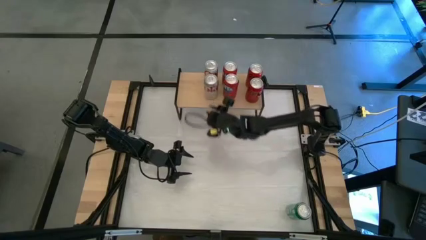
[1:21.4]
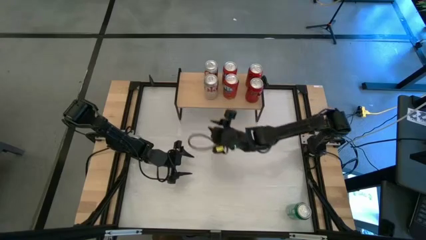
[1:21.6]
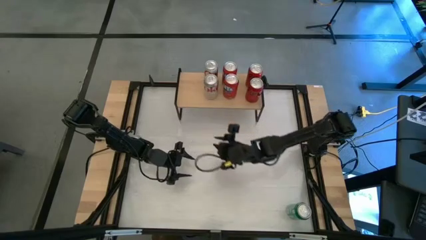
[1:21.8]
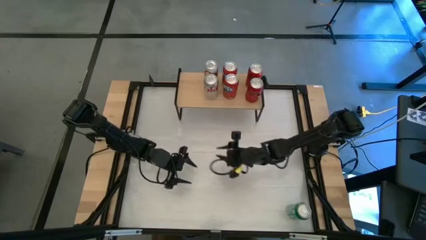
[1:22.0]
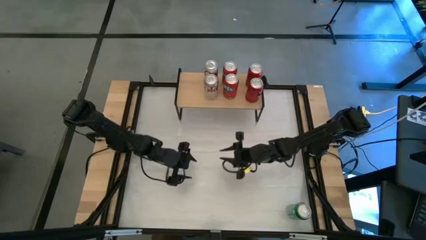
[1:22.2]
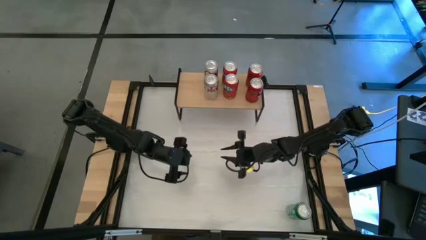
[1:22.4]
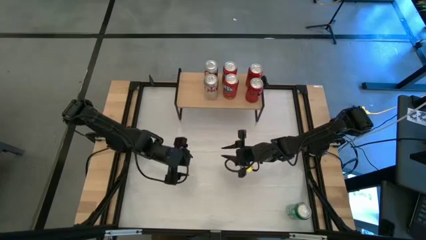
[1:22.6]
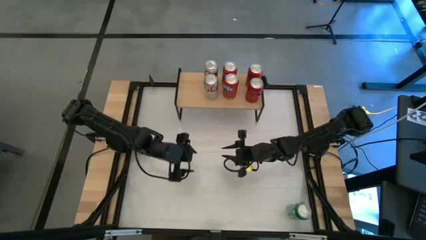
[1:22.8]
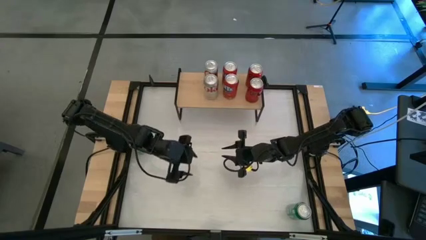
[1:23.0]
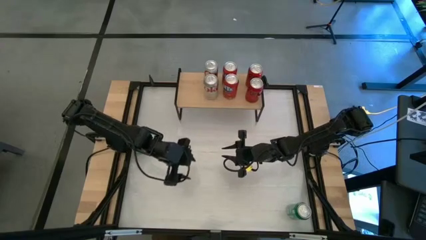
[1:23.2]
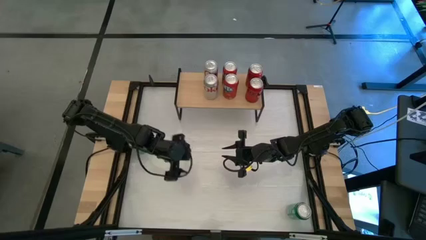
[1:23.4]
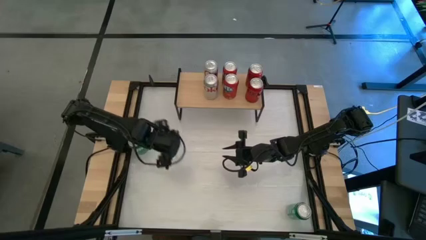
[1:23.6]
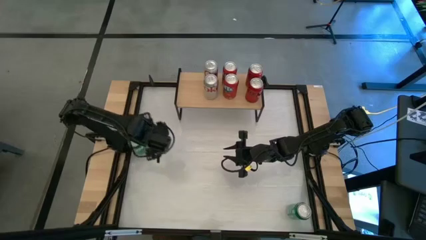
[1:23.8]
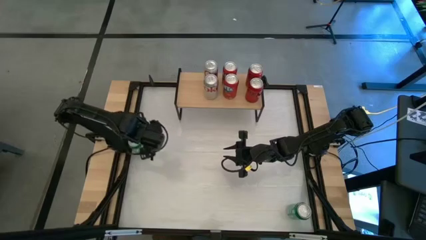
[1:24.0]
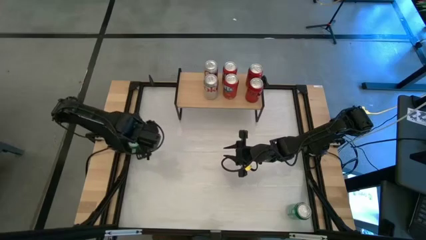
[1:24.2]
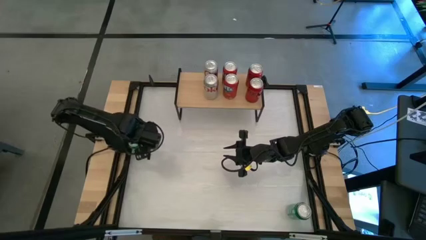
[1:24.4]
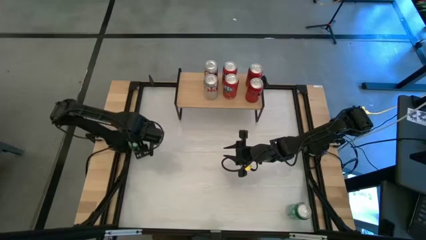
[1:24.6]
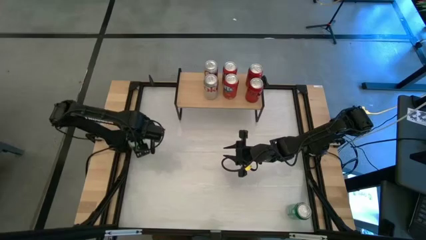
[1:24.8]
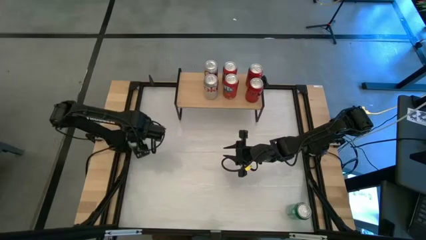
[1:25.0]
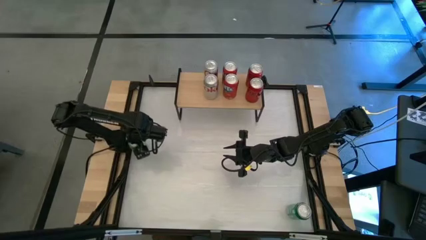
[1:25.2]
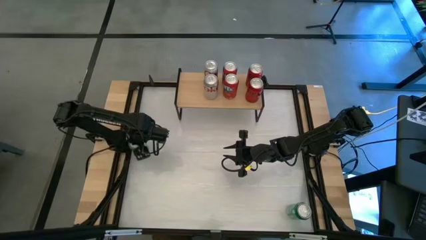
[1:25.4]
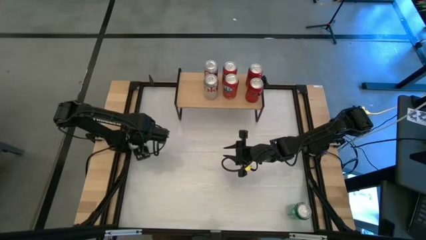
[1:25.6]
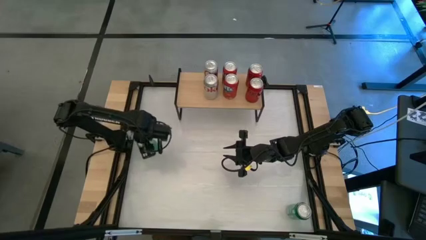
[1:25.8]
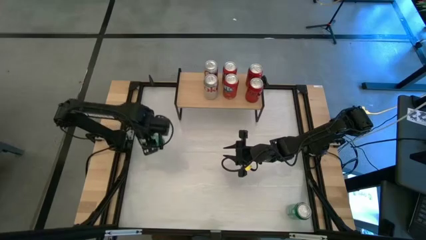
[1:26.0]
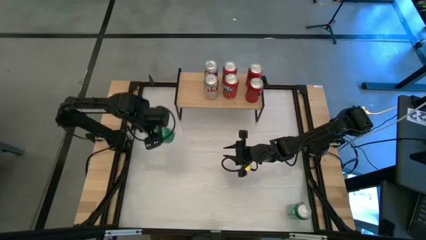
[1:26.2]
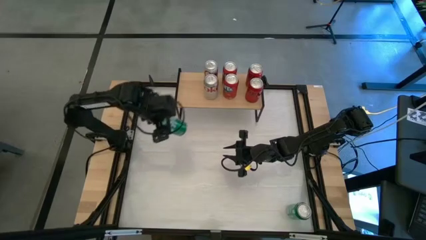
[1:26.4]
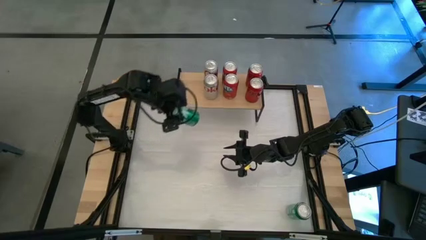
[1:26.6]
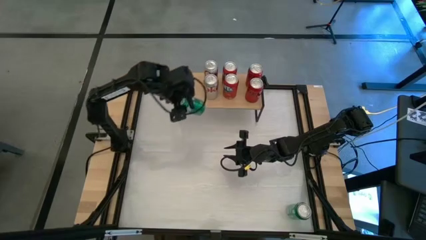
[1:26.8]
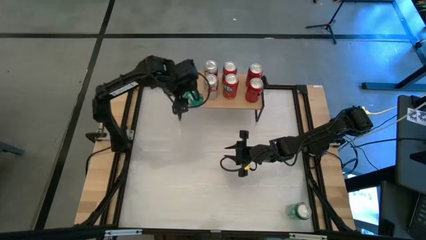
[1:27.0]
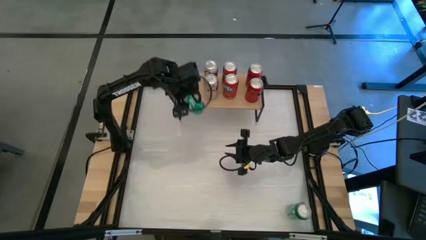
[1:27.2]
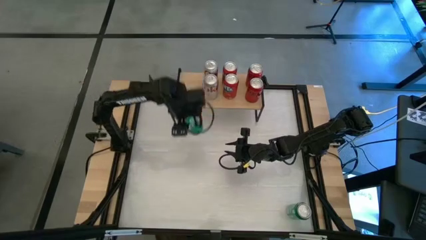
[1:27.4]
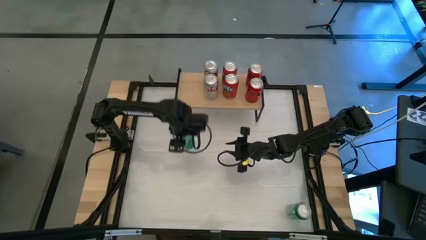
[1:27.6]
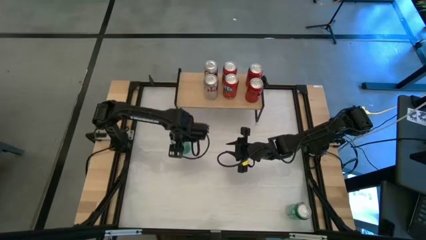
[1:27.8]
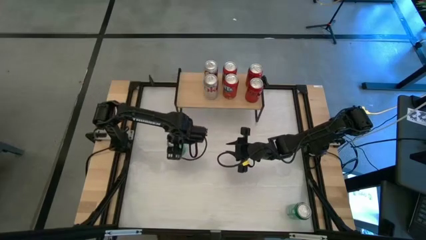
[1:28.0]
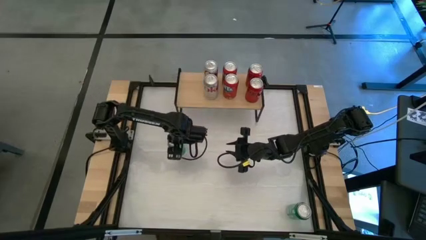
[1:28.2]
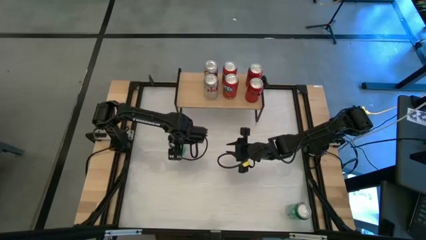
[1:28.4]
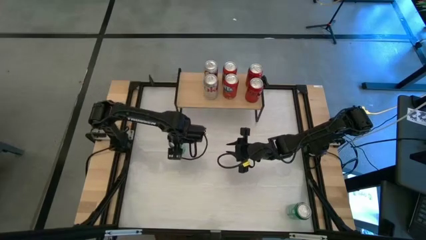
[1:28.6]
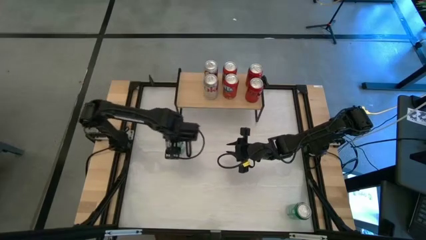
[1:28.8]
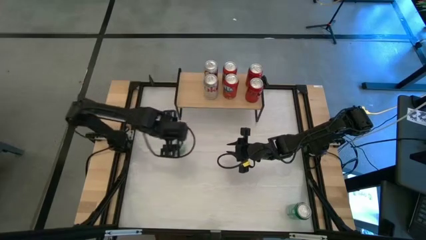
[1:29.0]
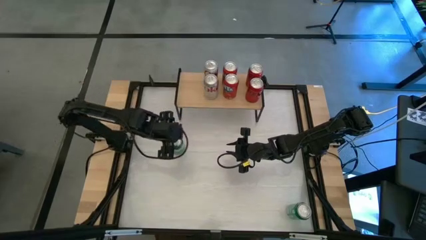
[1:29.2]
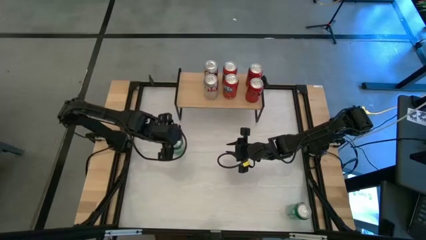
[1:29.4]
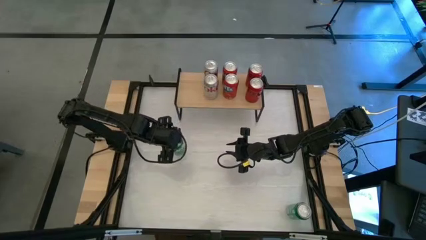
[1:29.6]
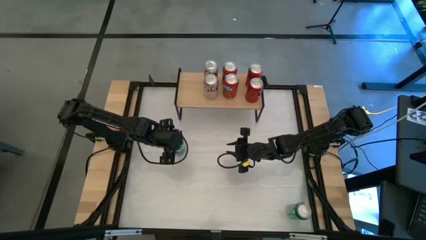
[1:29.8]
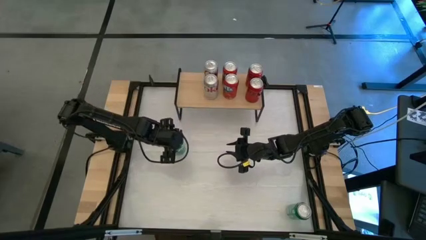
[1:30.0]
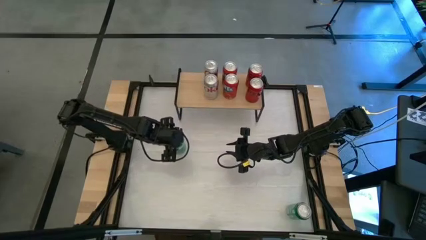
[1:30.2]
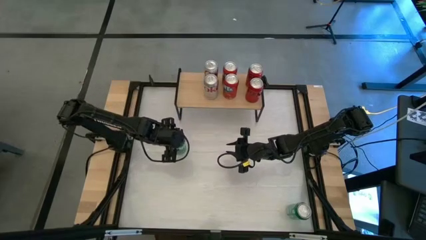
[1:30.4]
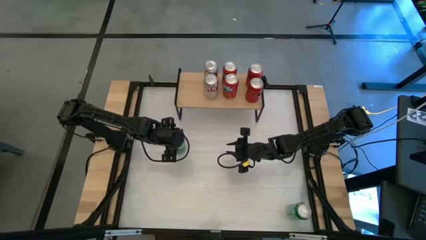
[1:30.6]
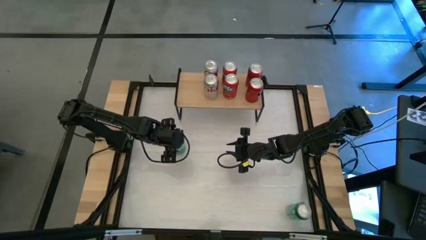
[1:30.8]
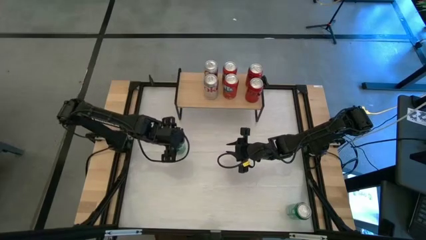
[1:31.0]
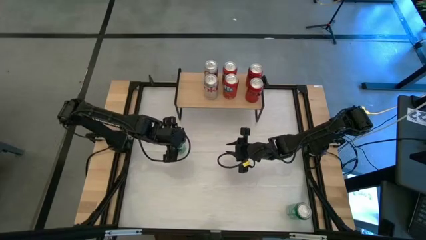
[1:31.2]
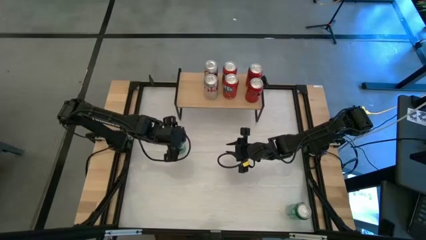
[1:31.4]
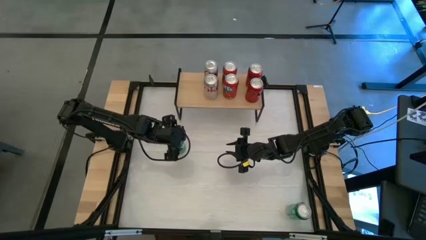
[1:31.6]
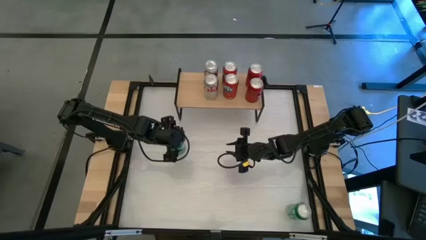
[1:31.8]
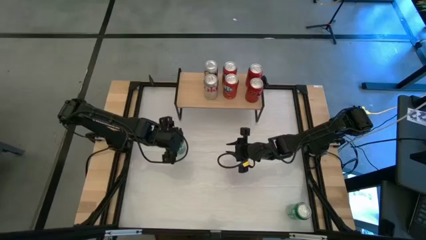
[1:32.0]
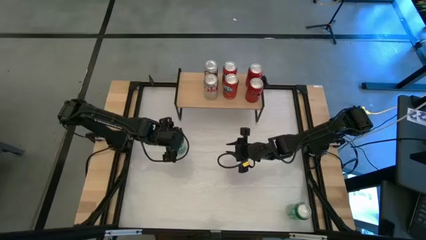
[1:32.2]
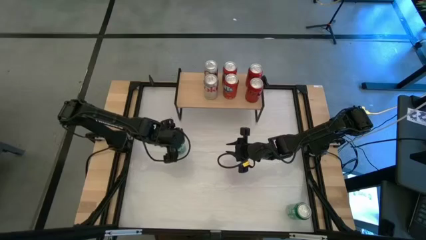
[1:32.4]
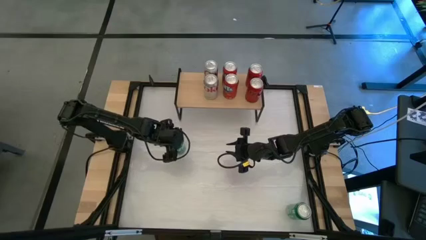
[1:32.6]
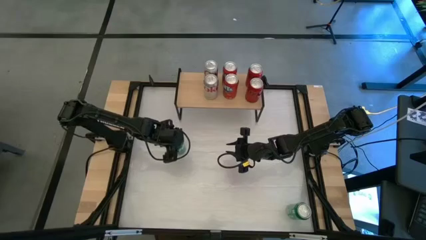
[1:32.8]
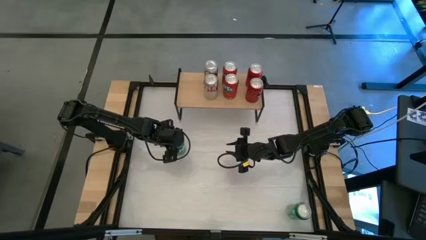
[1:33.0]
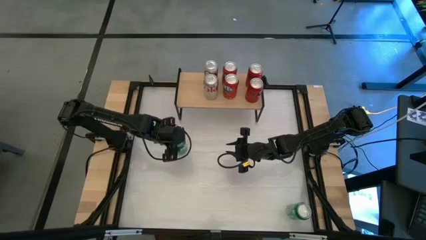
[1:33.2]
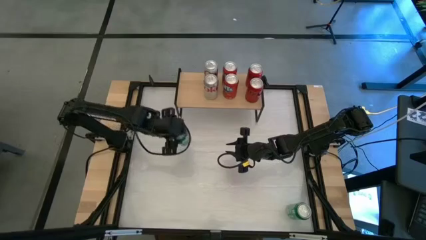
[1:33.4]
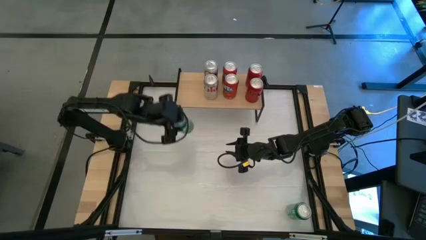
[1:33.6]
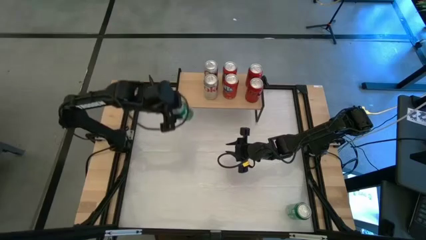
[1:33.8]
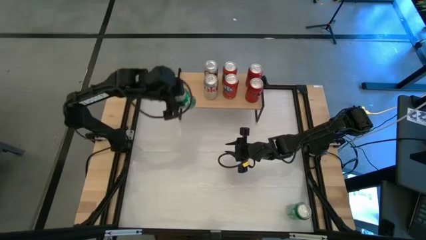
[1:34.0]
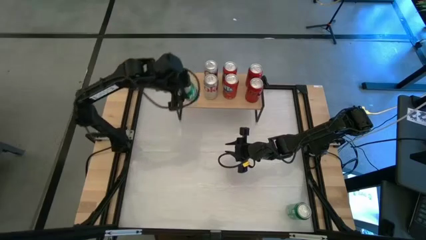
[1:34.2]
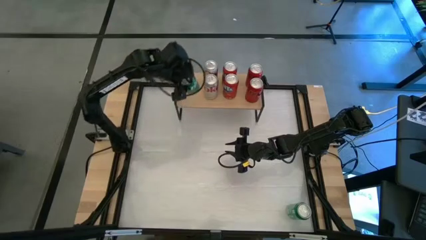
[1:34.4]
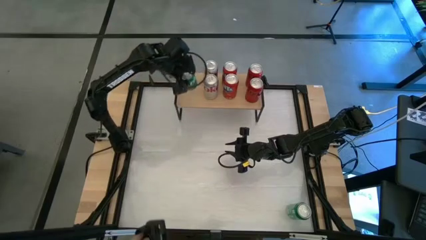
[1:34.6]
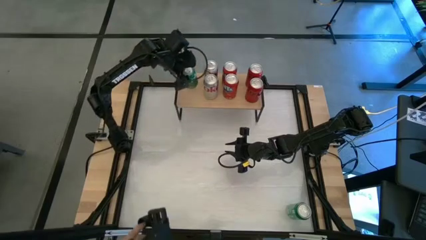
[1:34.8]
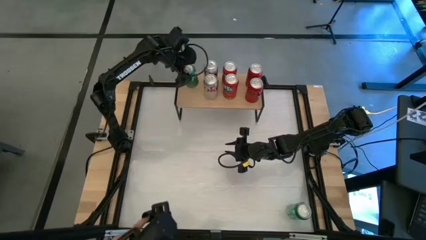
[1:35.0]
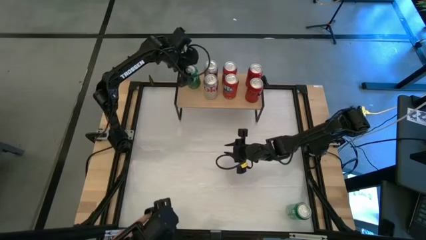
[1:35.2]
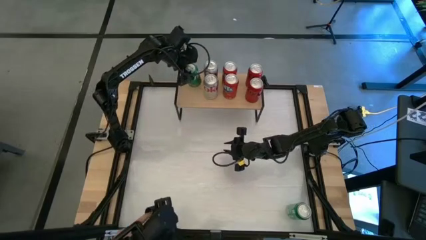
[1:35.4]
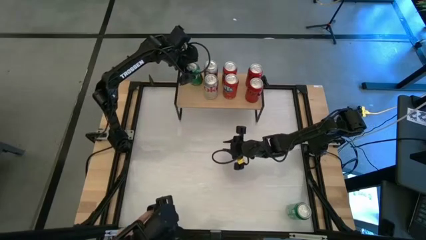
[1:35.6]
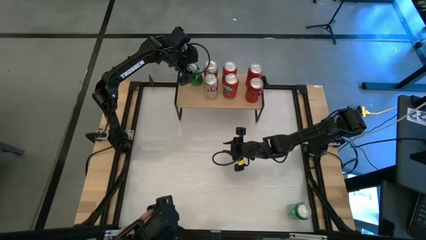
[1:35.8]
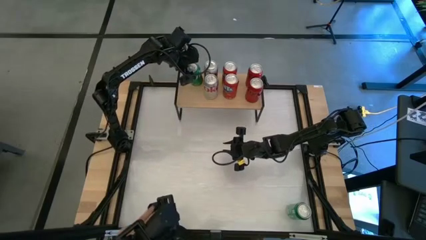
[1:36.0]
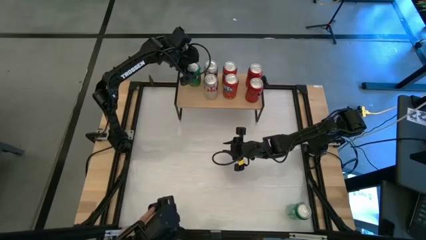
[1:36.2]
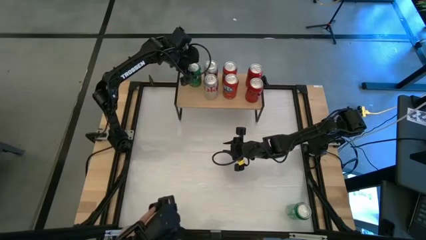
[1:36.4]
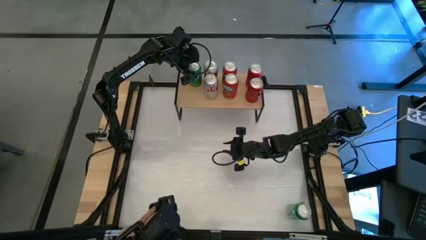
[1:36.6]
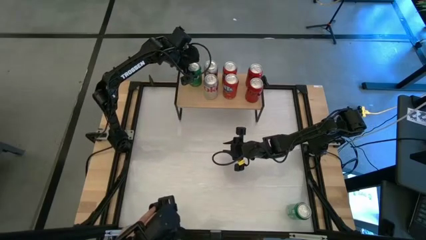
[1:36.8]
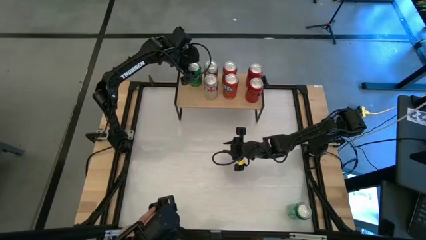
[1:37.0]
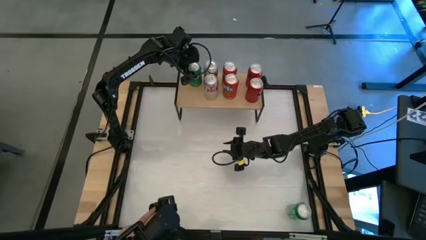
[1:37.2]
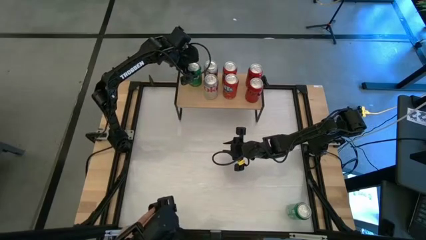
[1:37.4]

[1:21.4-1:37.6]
Task: Place canned beverage on shelf
Put the top green soda can on the shelf
